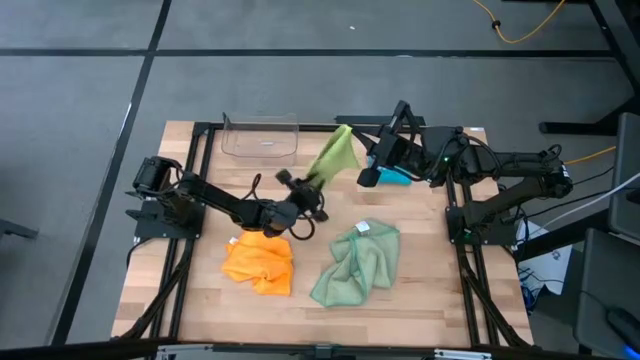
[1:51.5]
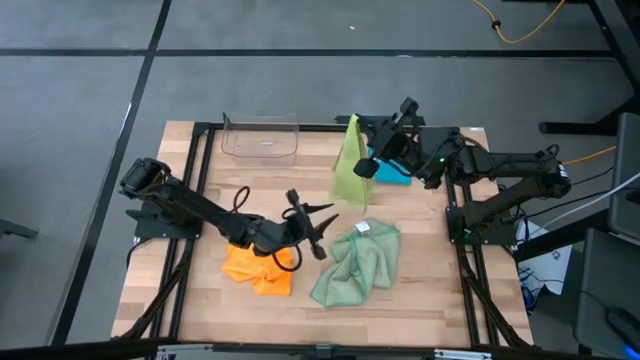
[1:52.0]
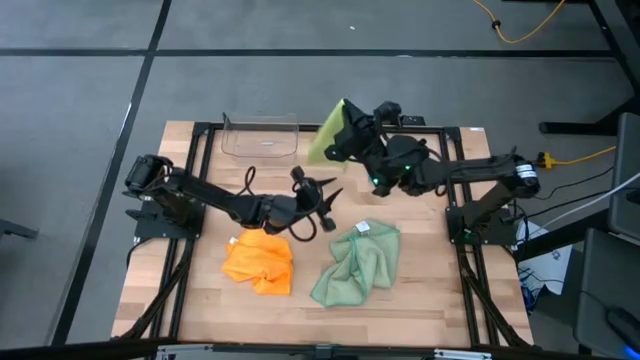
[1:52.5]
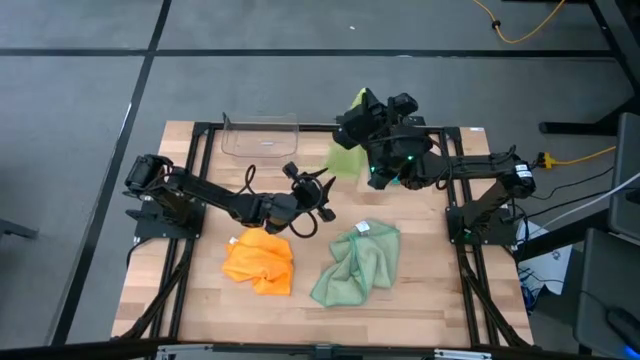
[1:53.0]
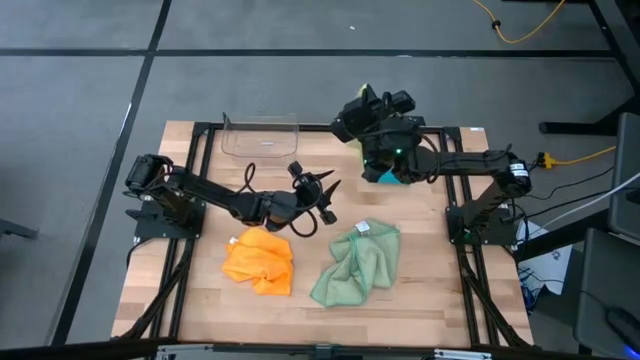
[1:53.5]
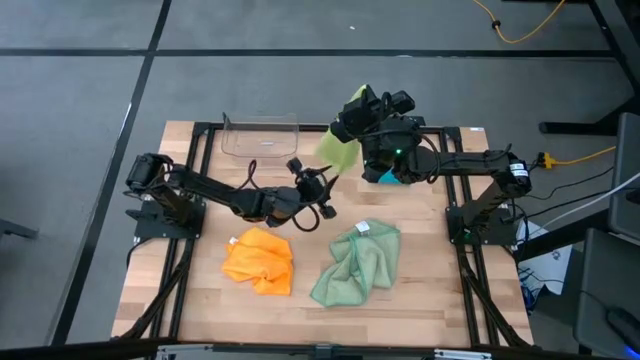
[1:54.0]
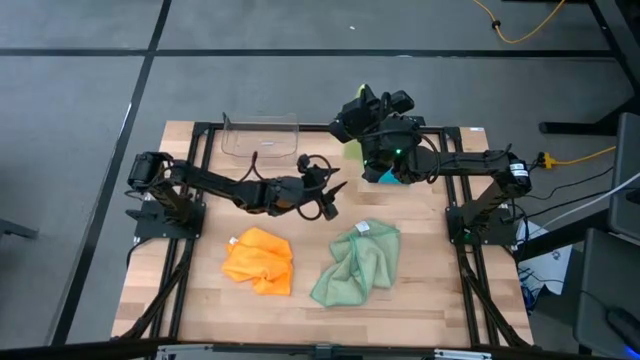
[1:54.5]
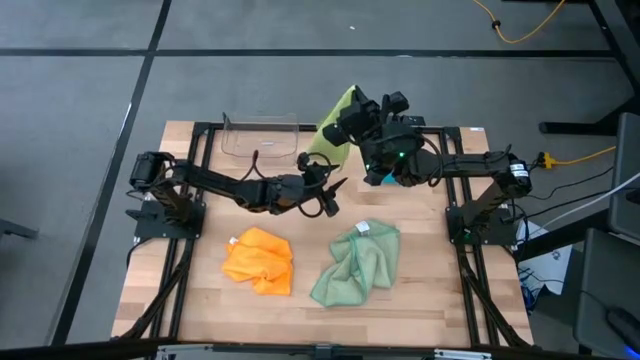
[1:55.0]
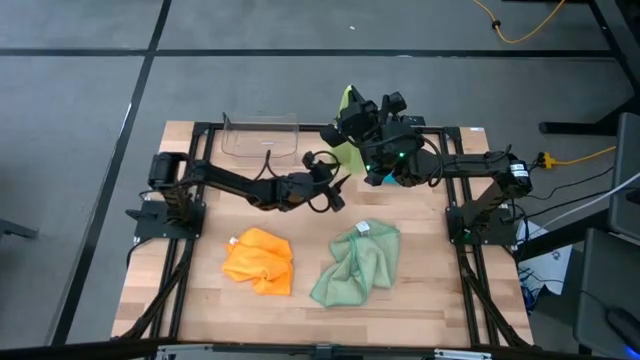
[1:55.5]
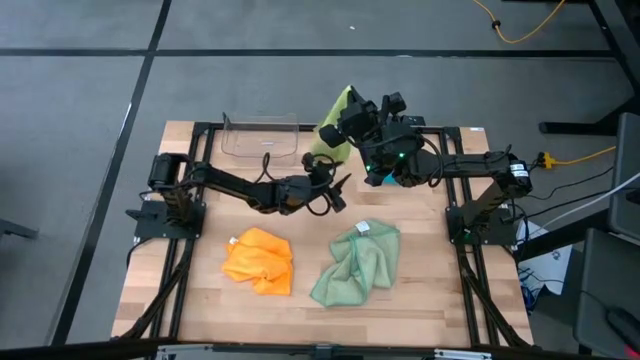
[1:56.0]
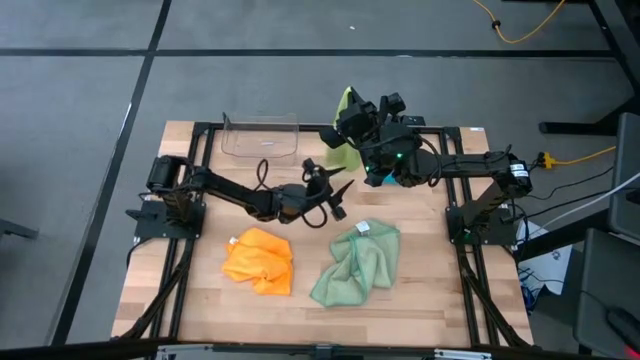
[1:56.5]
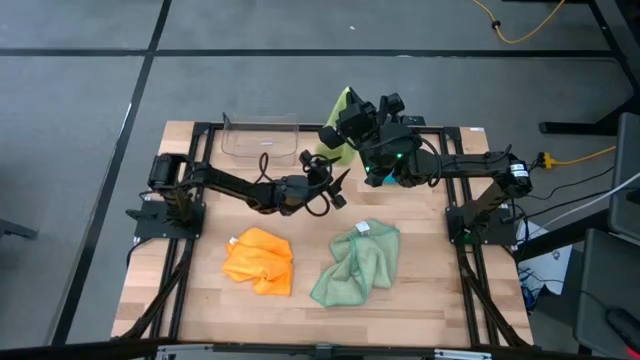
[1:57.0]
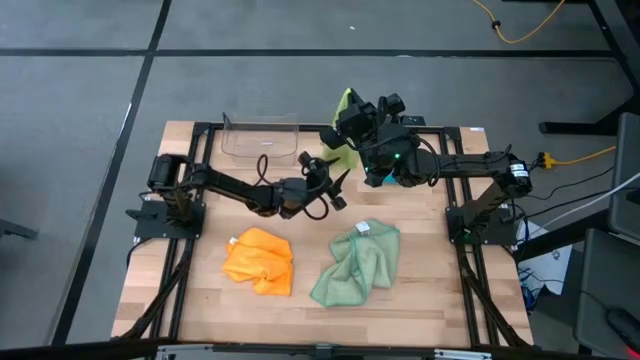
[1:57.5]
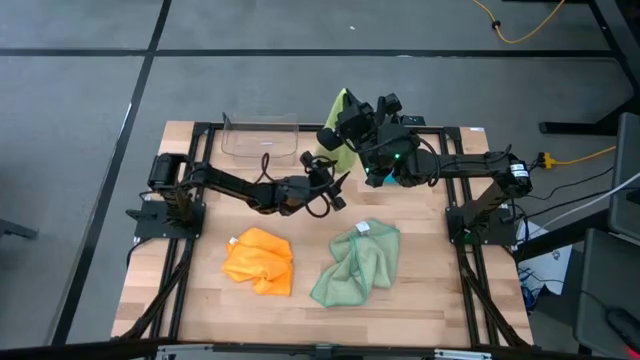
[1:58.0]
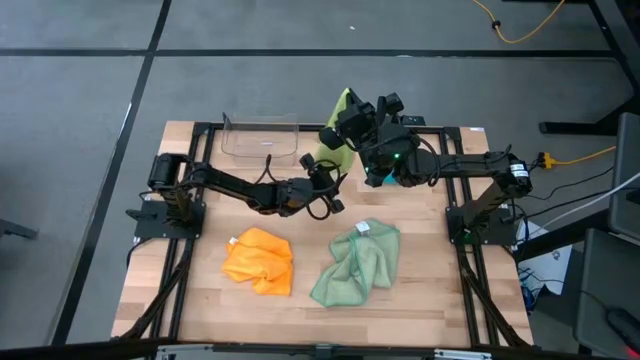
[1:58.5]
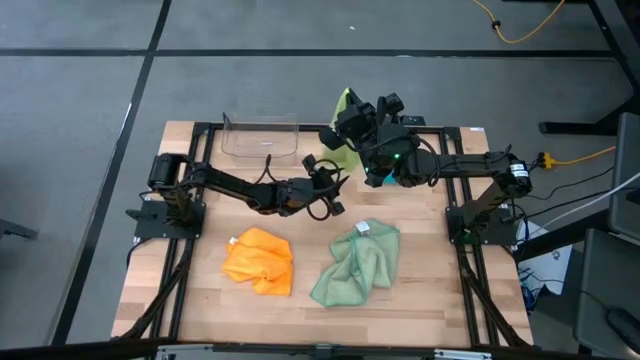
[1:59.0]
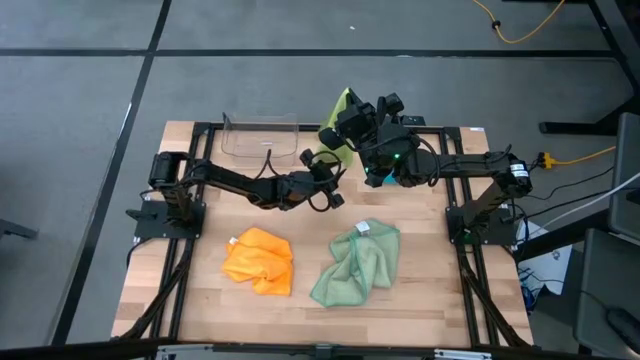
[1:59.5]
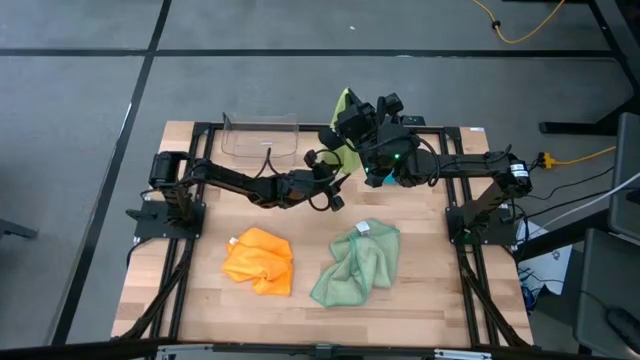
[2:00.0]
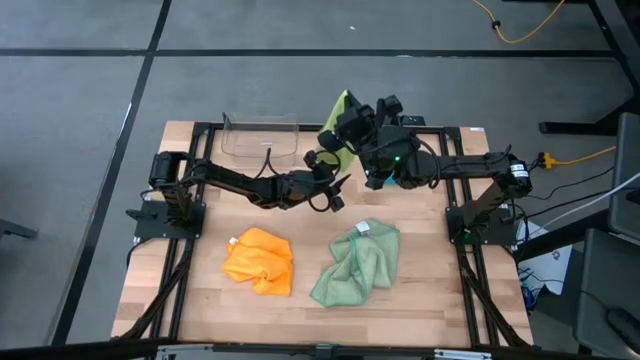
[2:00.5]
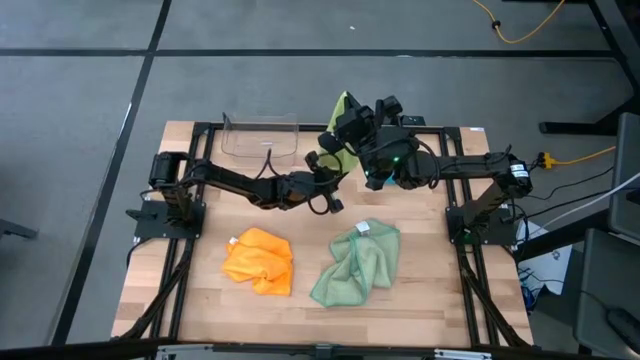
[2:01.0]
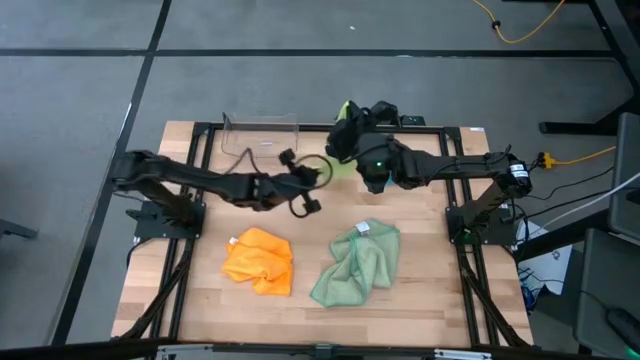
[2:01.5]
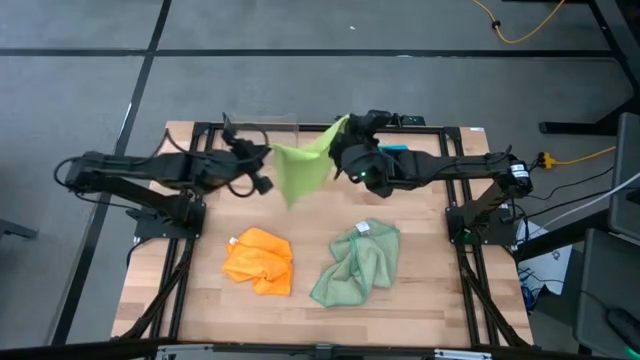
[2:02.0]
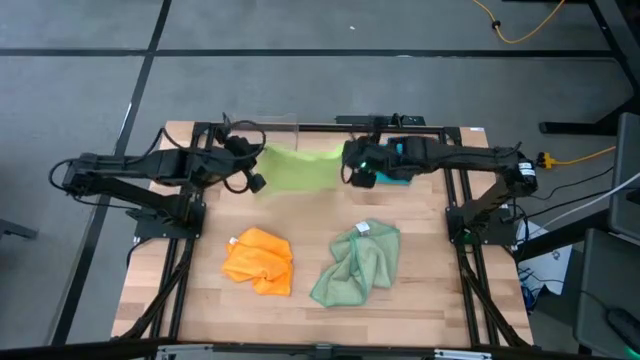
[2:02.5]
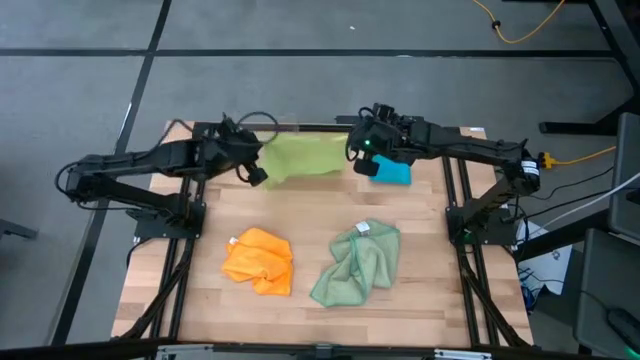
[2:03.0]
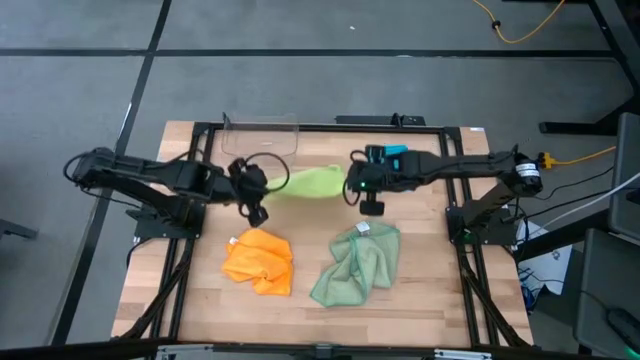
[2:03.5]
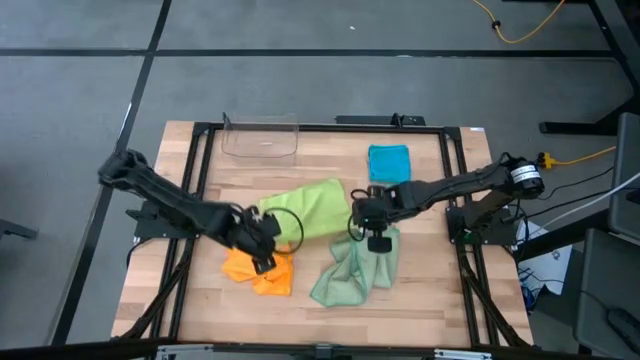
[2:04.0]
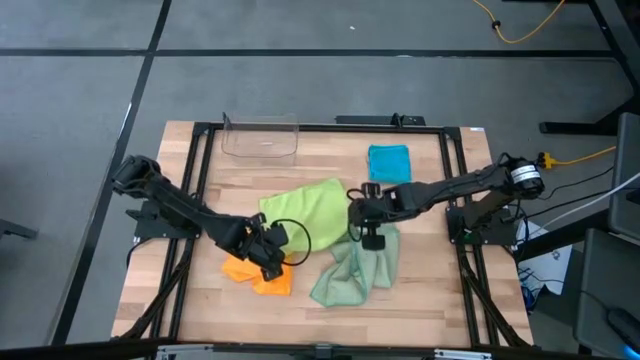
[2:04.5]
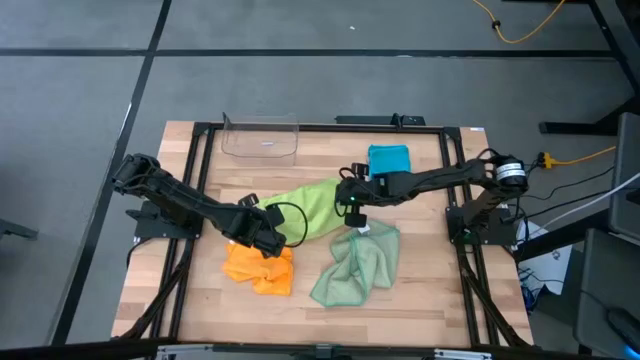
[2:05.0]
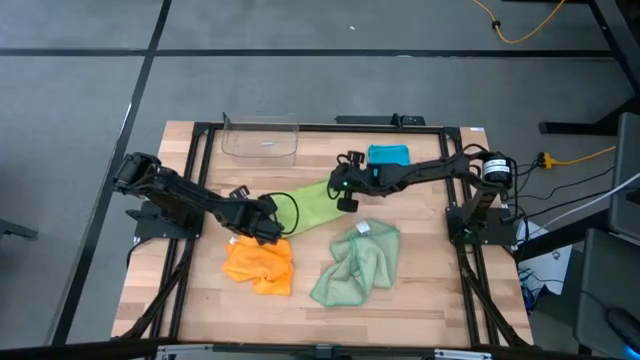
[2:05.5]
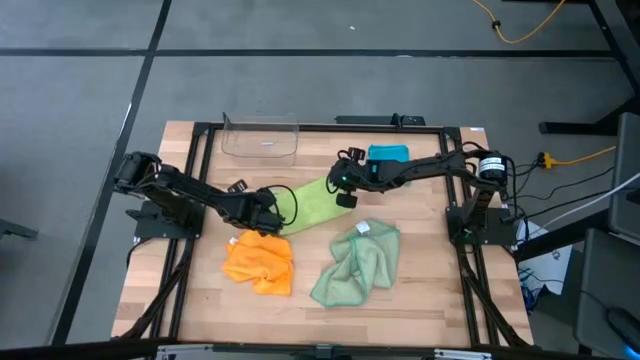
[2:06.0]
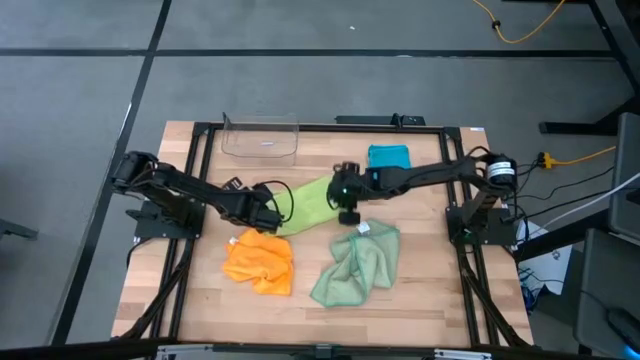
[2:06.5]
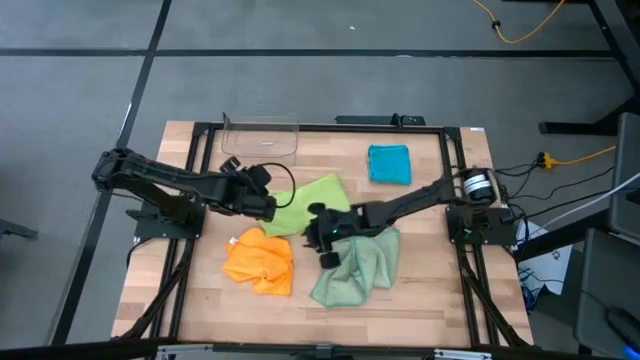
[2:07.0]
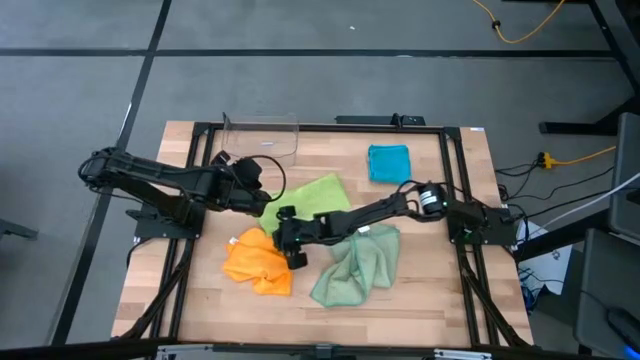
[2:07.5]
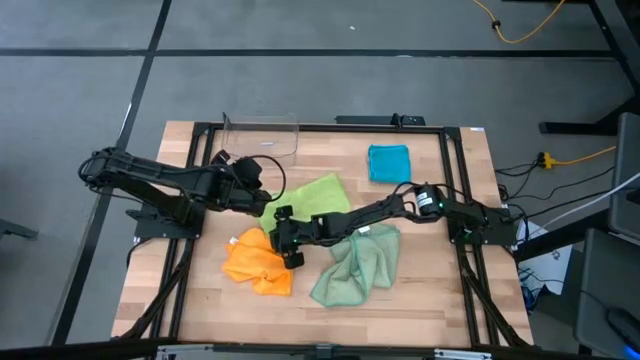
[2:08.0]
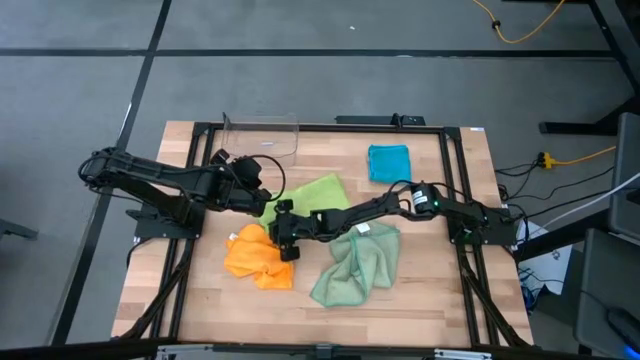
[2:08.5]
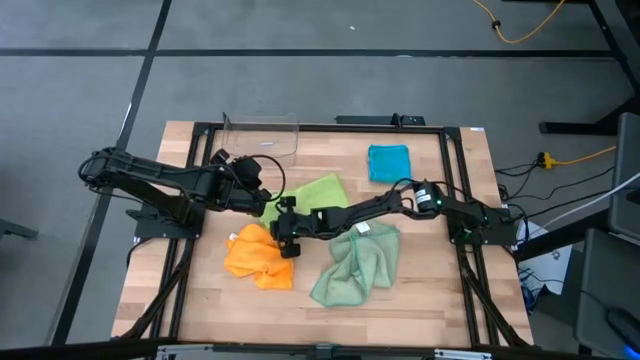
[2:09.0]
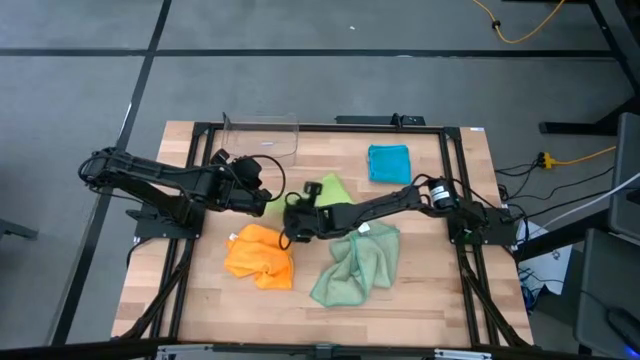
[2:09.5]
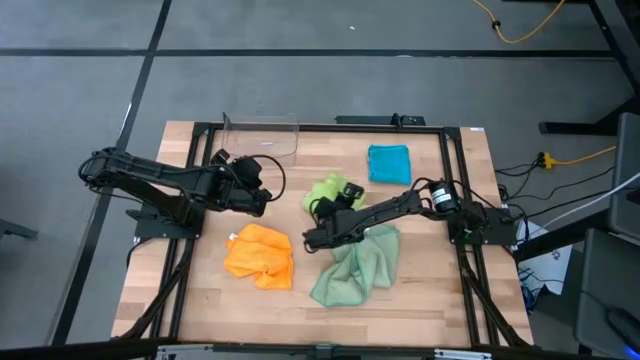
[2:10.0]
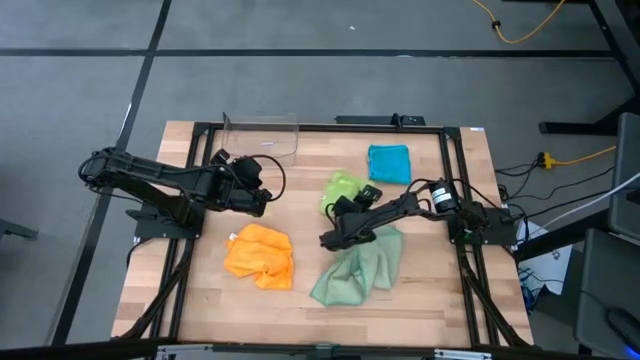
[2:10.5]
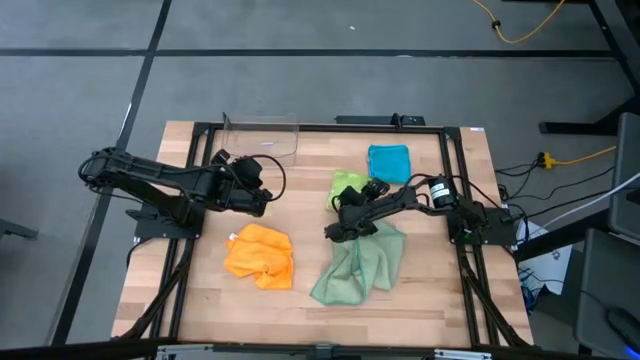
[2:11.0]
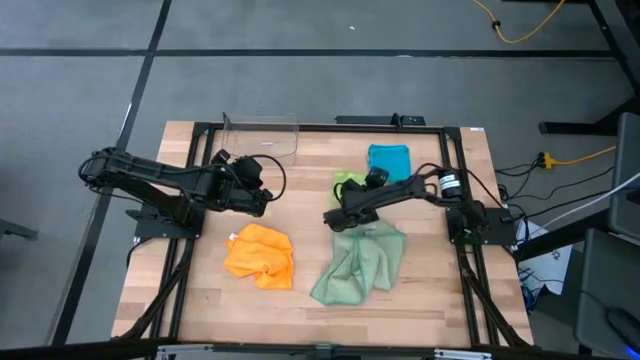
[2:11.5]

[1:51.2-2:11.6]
Task: Fold microfiber towels
Fold the light green towel
